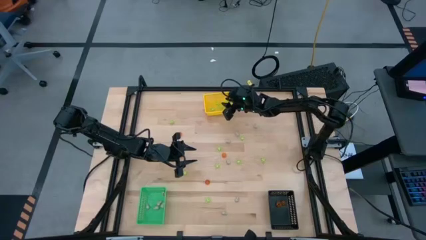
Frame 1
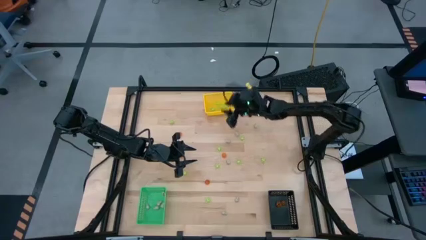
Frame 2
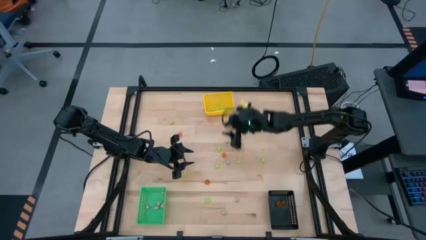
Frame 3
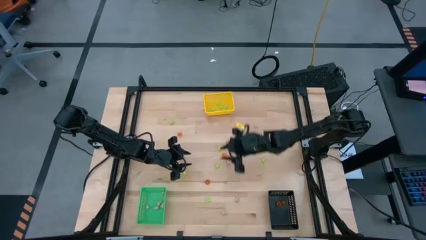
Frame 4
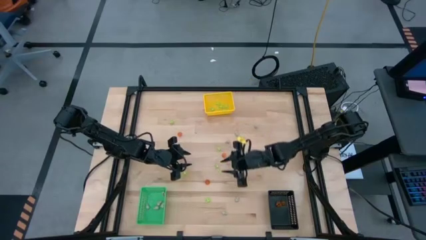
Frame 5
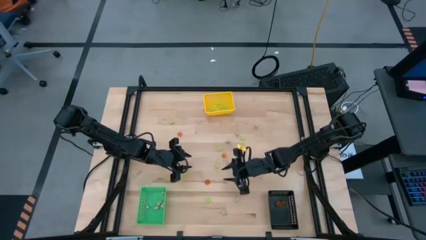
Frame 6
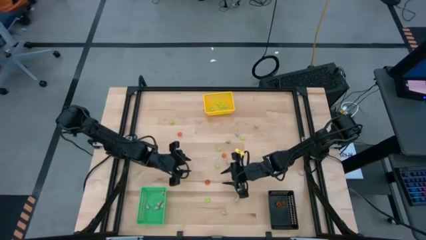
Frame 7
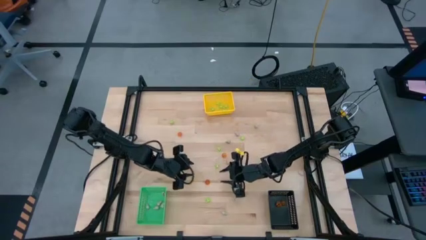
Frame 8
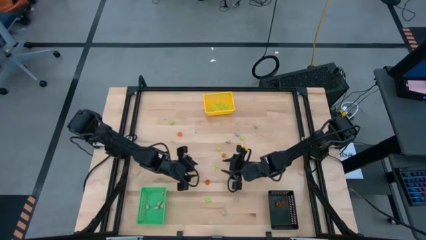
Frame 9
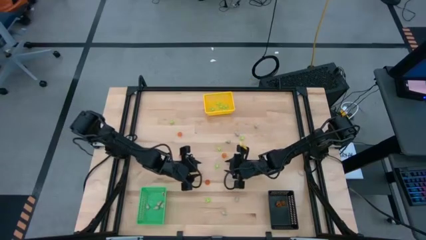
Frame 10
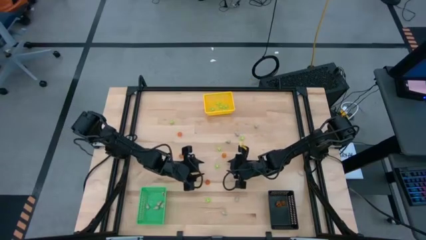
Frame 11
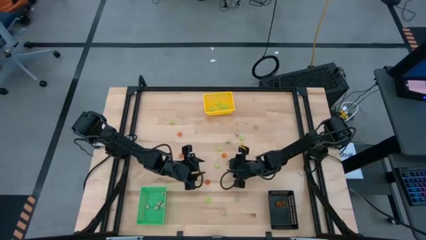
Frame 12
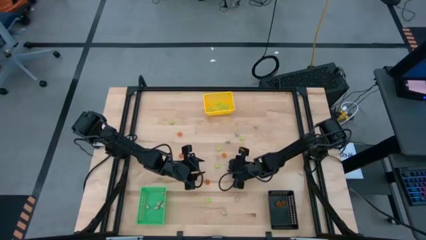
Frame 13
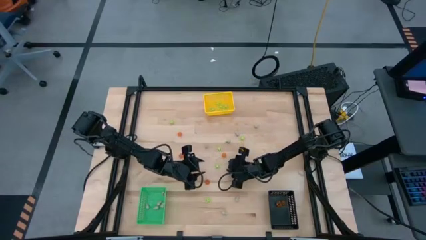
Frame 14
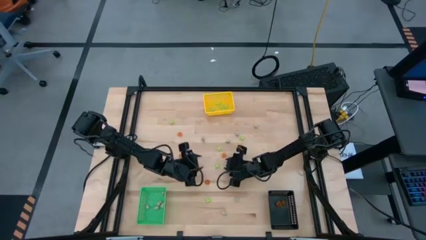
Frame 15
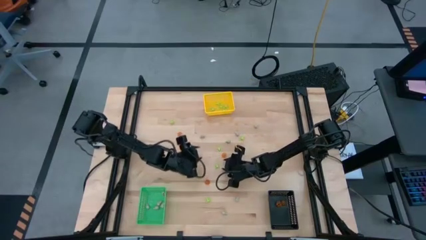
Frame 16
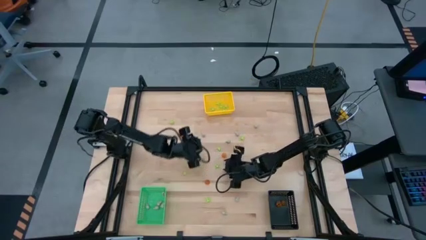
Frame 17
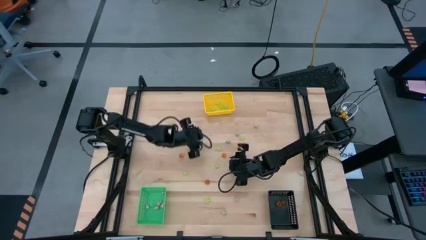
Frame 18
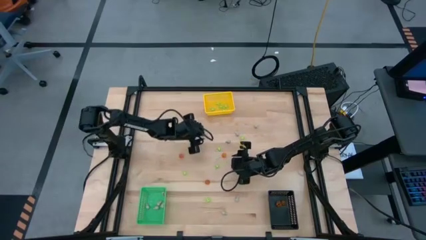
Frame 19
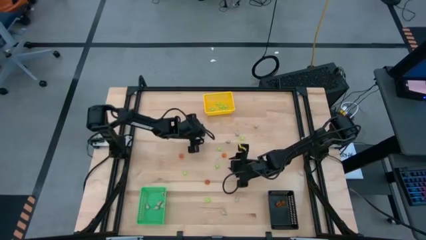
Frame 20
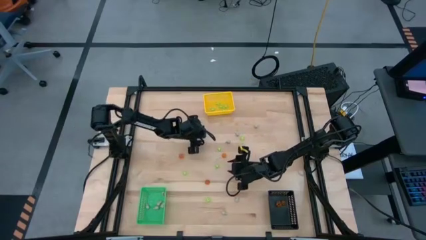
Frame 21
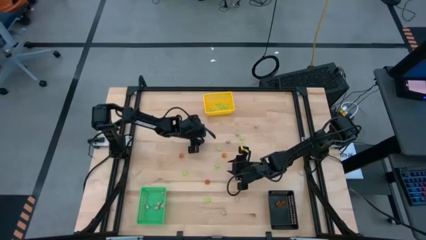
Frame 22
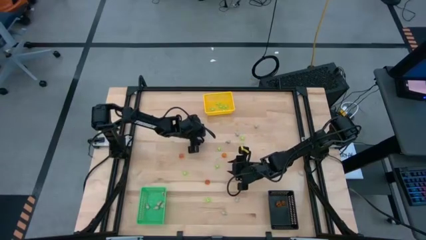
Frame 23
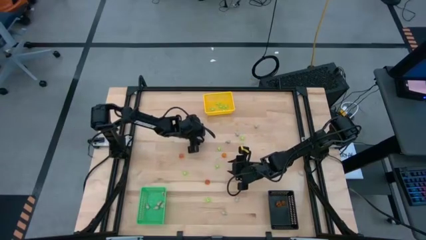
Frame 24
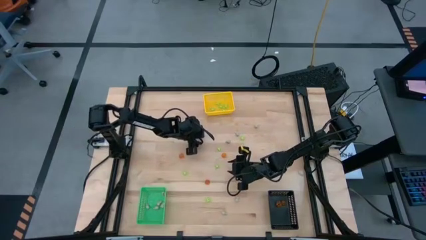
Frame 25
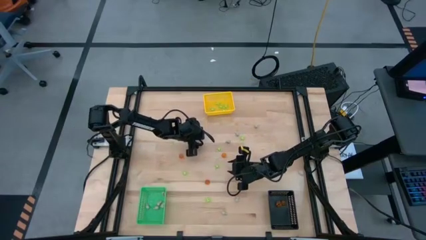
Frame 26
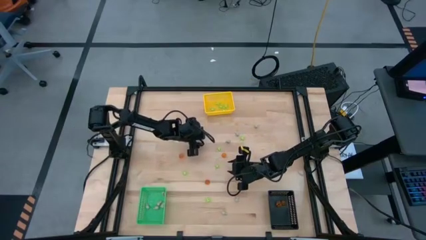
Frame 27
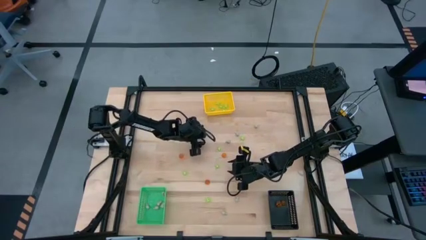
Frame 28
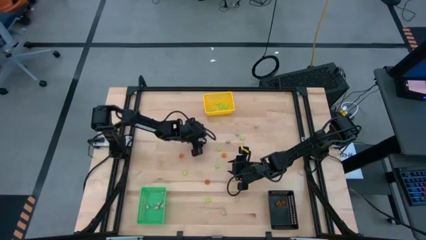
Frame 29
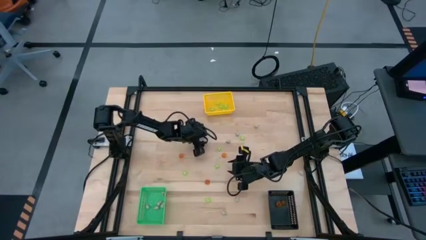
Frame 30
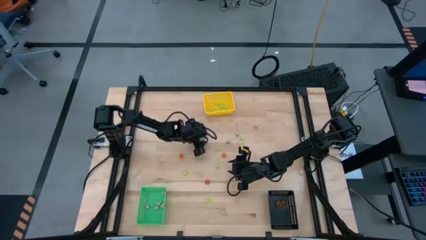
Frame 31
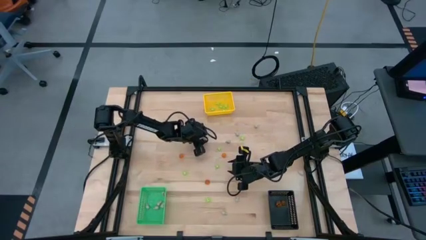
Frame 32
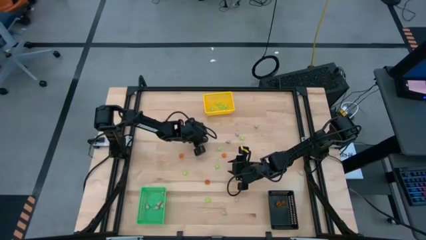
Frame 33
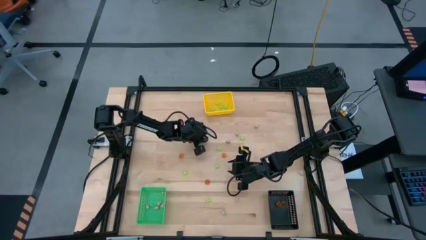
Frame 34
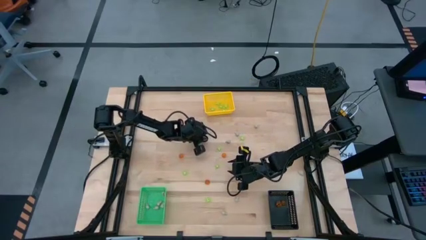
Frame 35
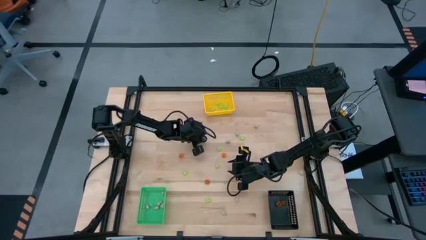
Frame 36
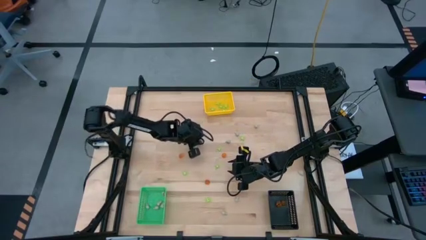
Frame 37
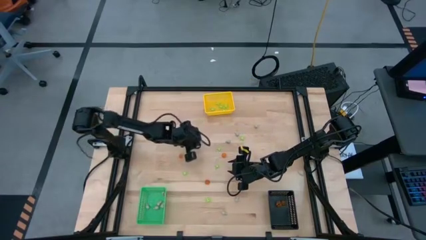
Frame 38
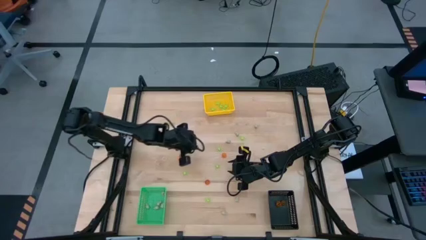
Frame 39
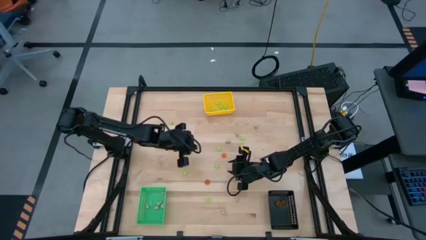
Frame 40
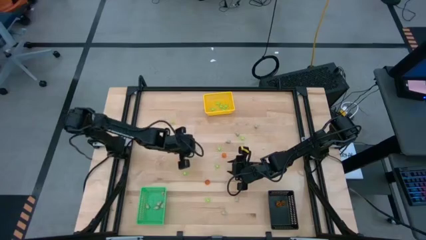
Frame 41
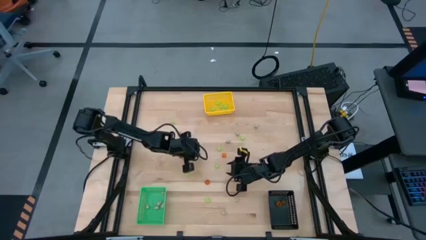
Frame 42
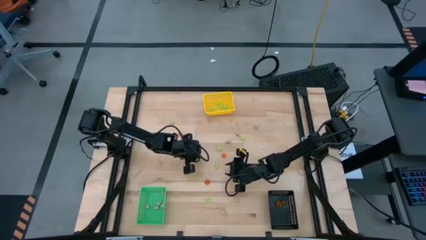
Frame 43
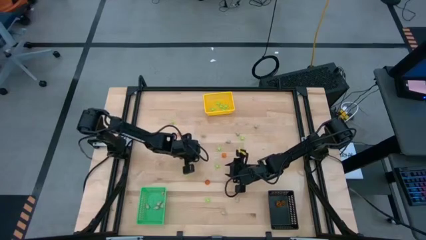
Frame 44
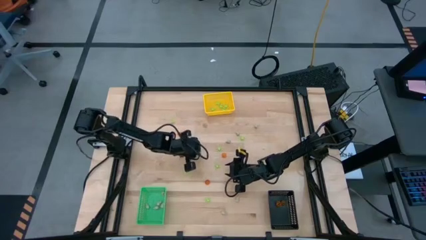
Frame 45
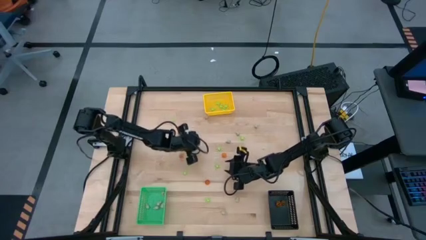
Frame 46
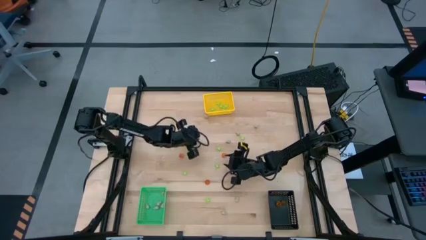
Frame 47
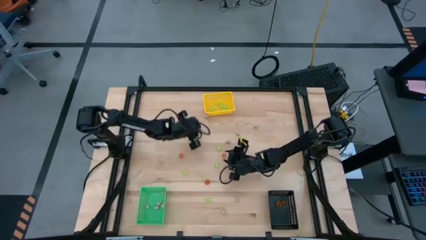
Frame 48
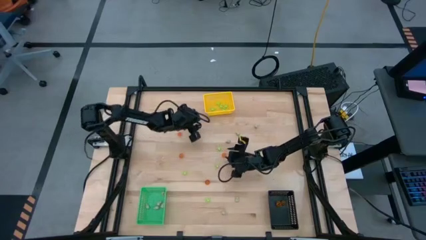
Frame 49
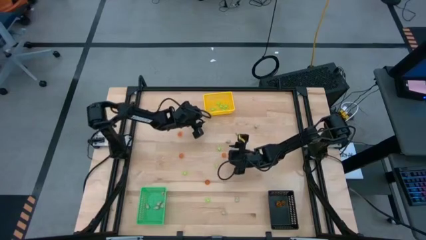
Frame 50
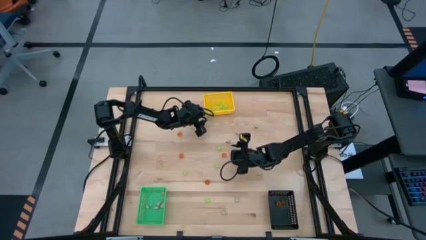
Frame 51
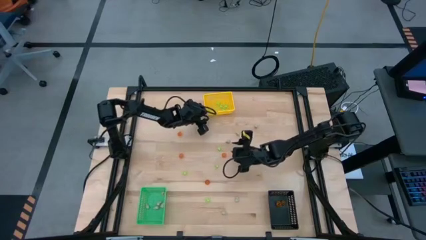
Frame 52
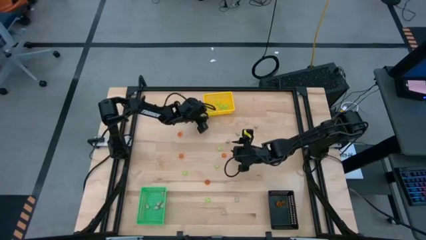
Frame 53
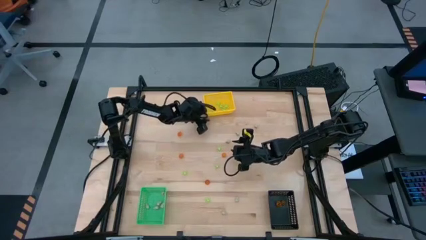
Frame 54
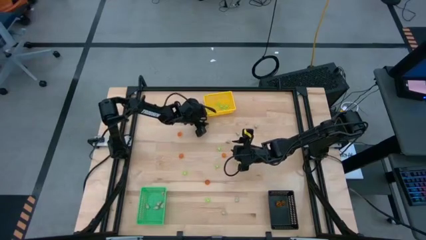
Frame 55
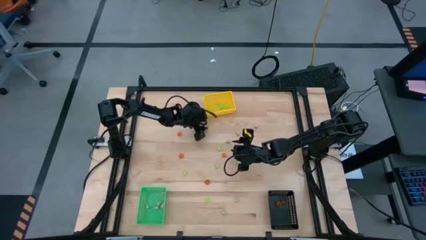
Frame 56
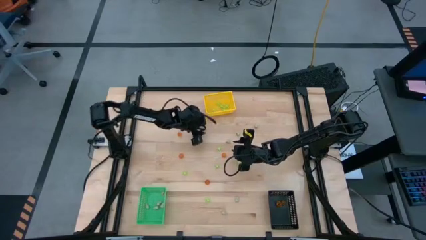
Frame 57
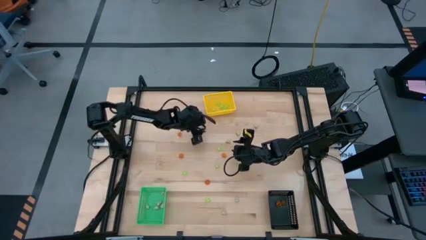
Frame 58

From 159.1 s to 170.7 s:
Task: Sort Halloween decoration
Put the white skull toy into the green bin

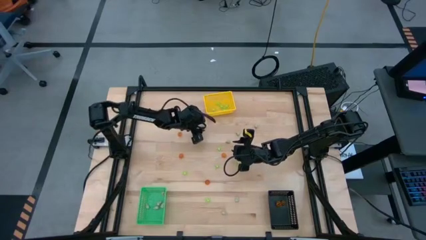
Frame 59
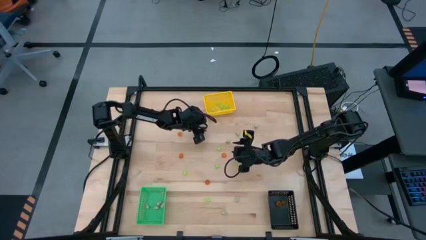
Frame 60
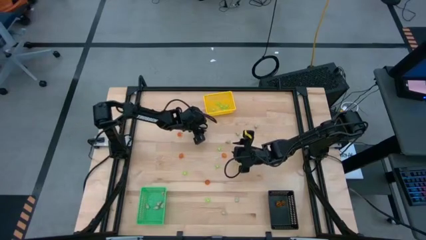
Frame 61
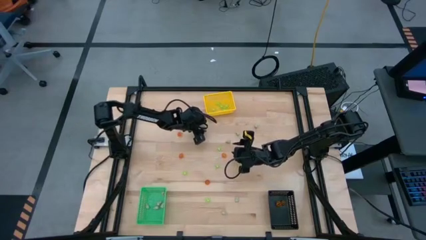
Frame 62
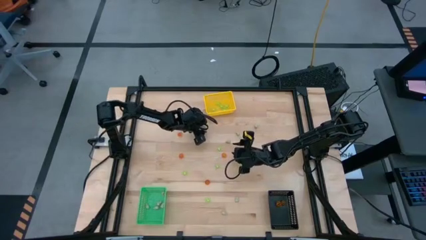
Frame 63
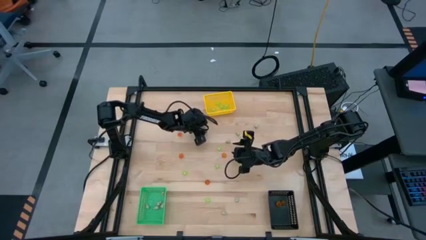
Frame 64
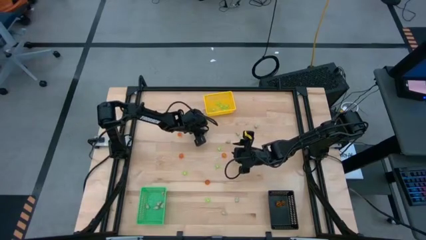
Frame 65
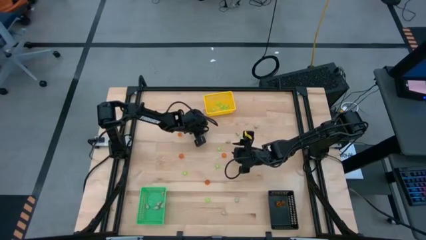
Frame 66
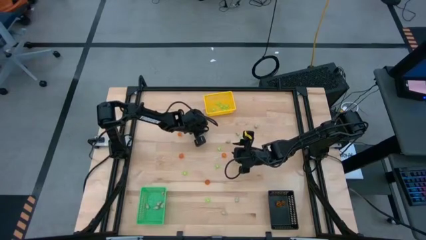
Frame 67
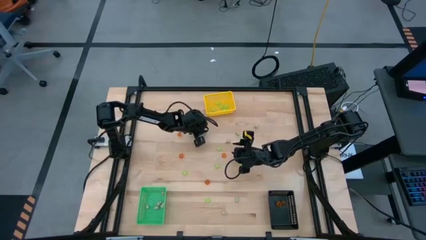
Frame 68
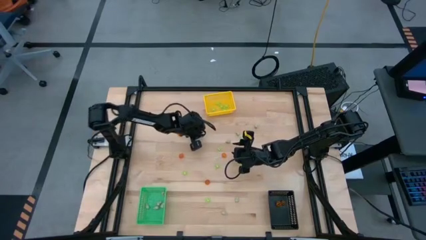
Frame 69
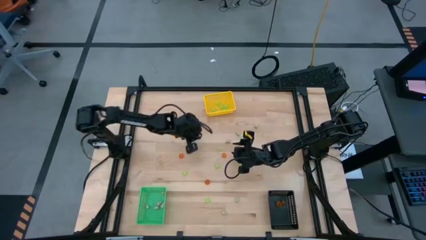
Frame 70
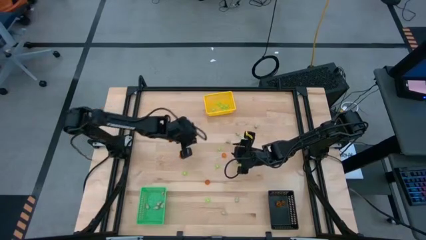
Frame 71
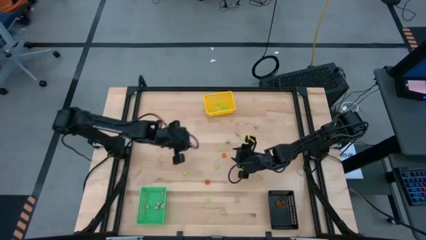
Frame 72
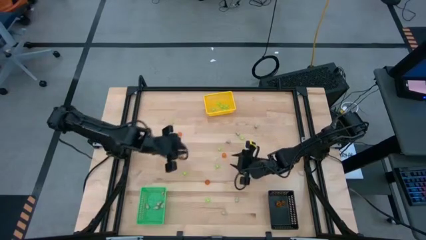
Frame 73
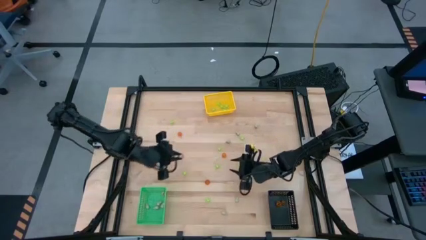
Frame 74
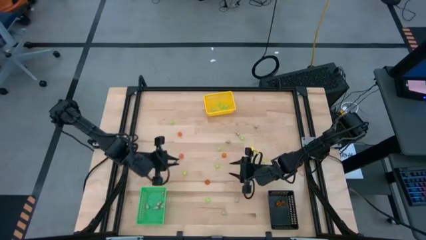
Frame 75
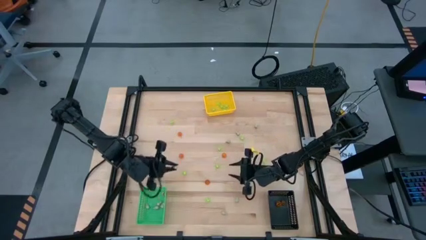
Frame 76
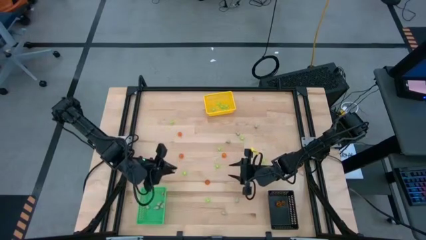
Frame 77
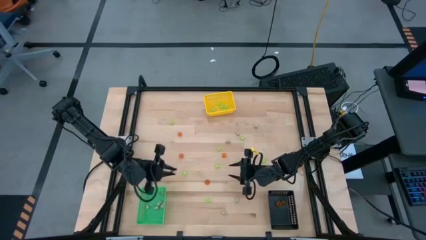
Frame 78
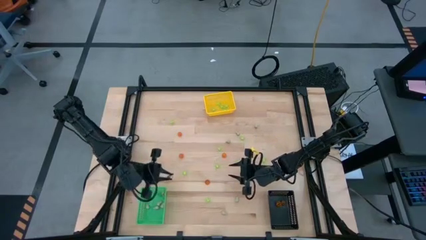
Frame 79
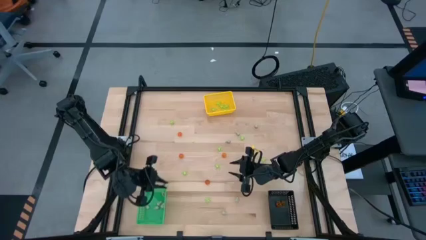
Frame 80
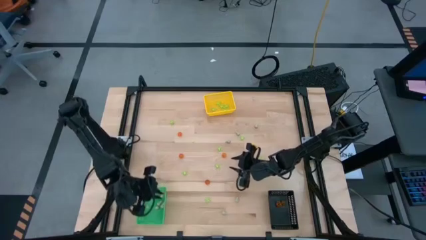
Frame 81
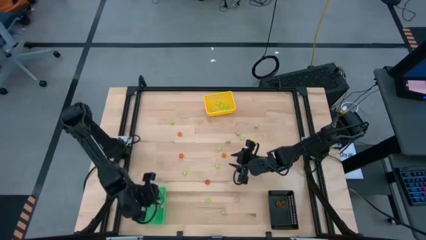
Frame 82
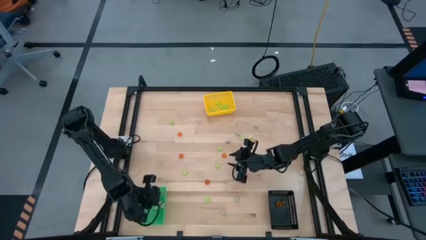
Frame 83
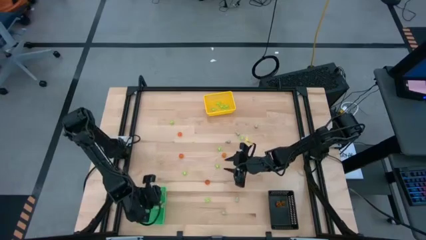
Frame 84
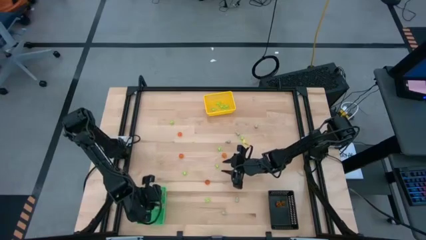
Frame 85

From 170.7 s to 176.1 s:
Put the white skull toy into the green bin
